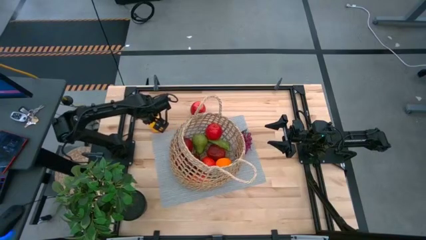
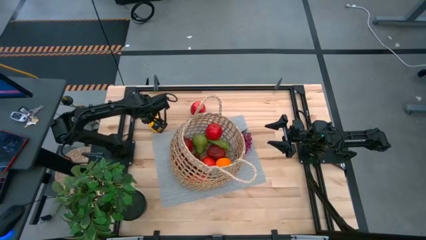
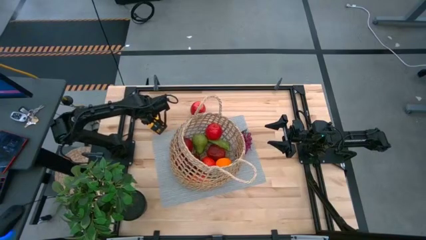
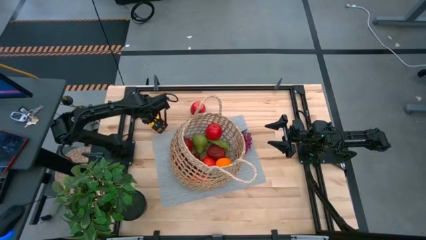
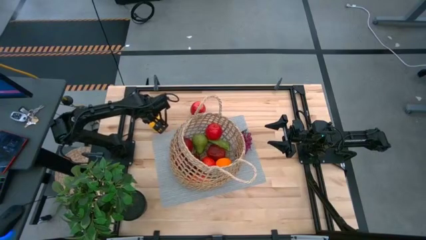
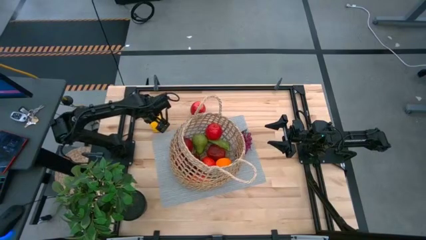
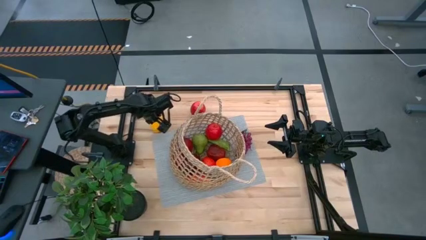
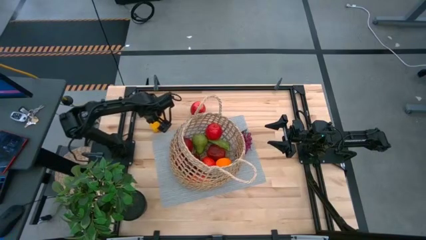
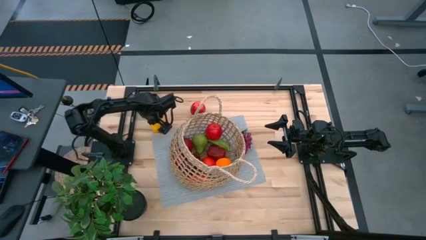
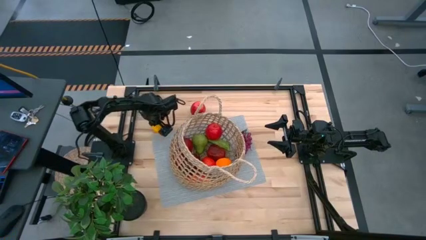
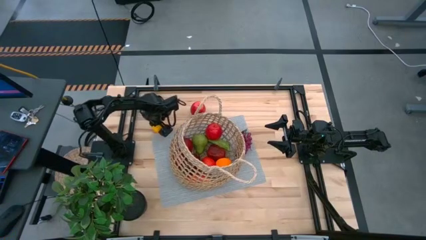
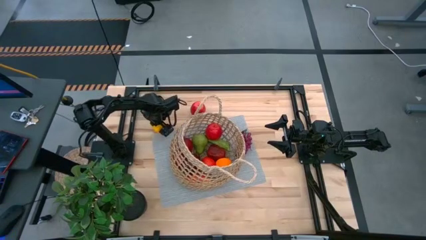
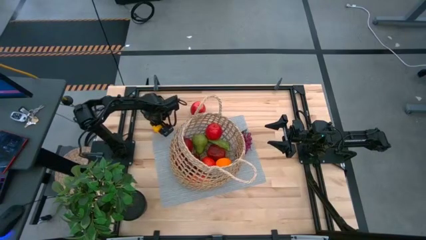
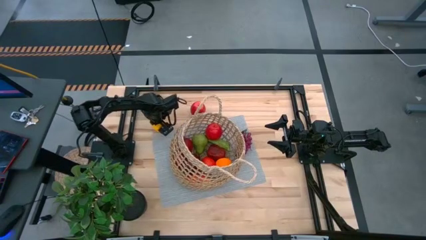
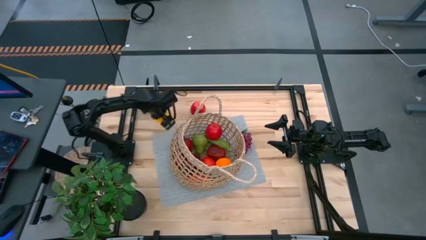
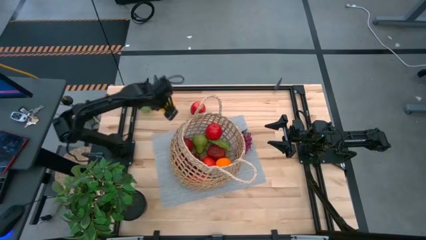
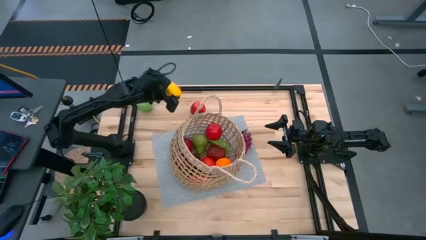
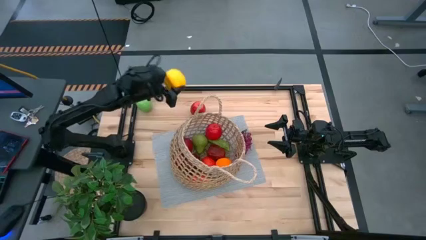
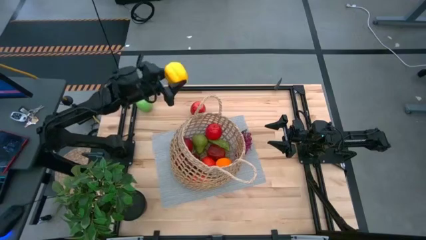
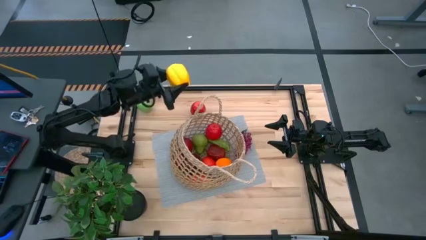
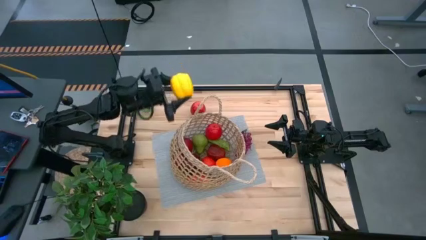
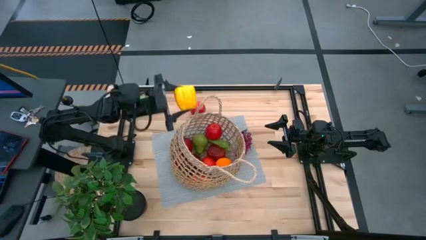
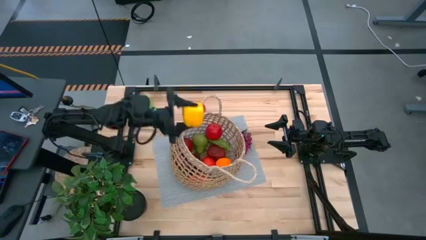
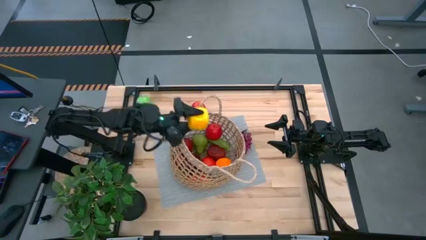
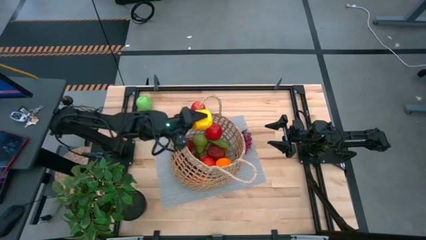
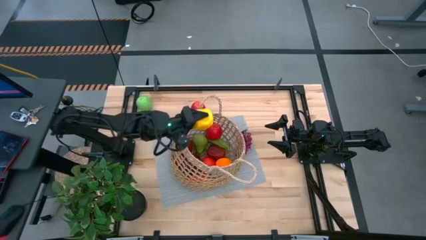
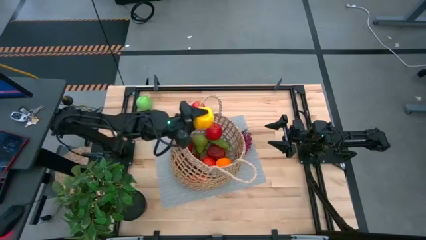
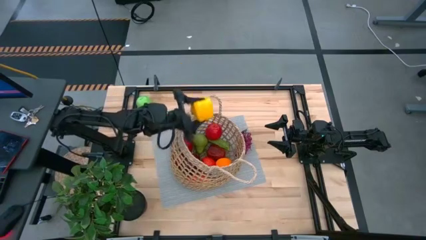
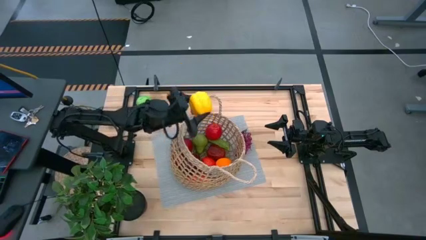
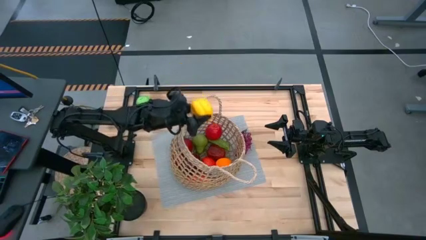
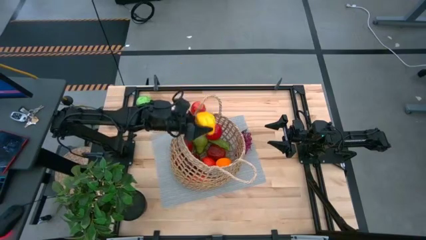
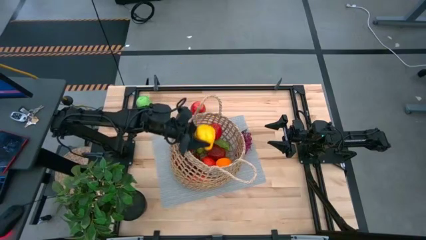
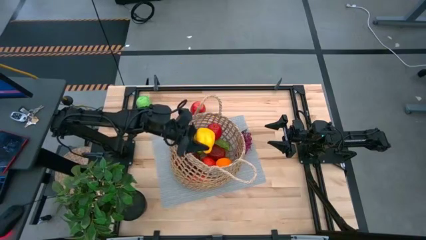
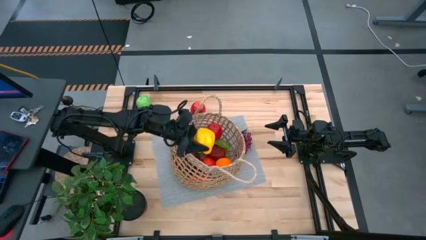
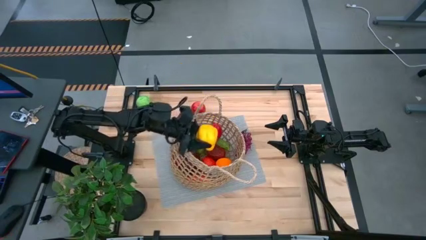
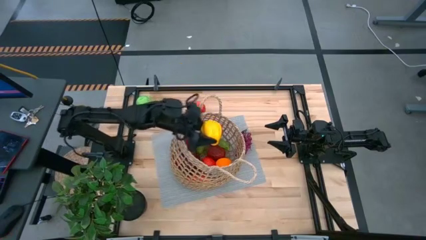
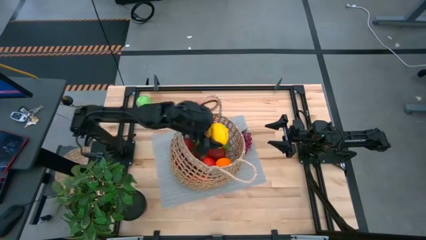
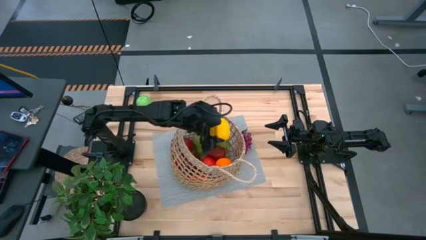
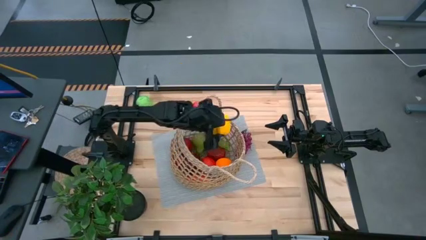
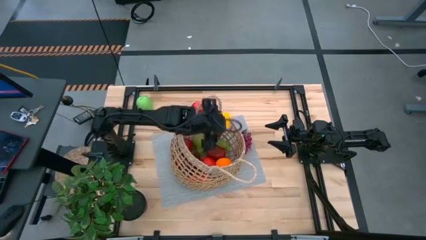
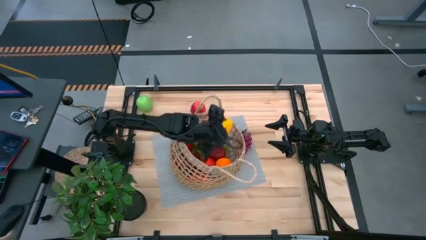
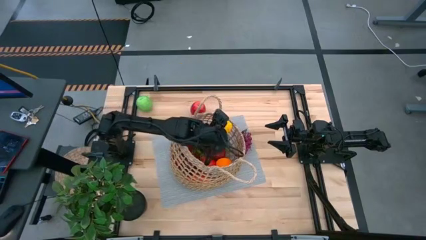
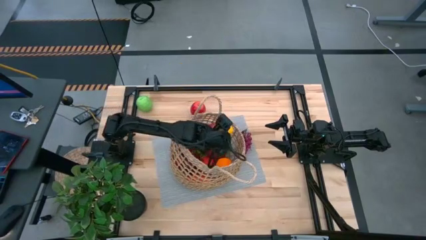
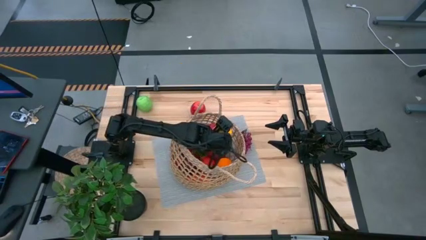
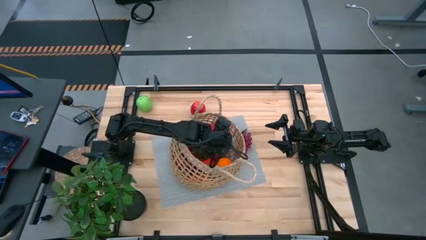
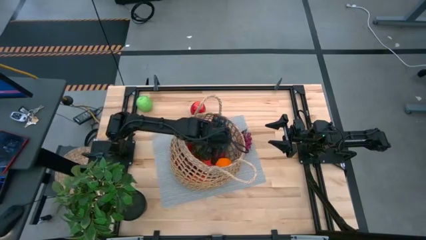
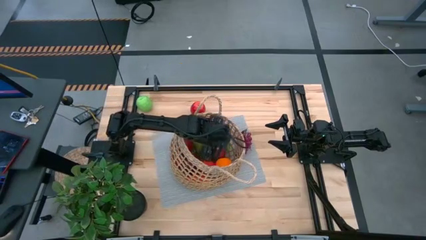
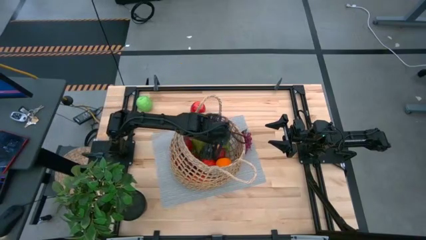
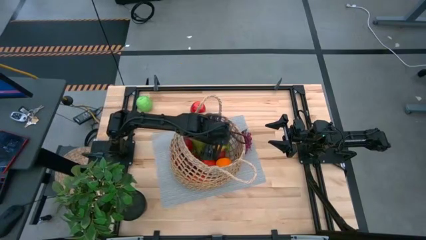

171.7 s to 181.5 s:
Task: Build produce basket
Put the yellow bell pepper into the basket

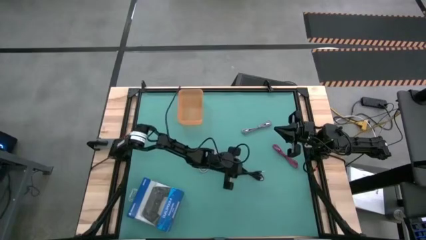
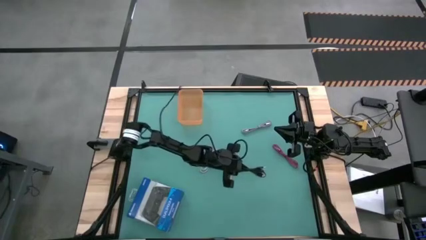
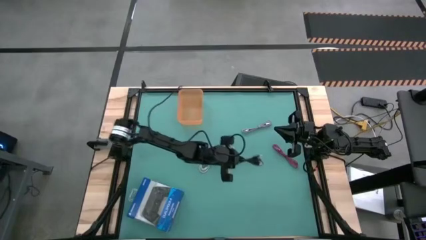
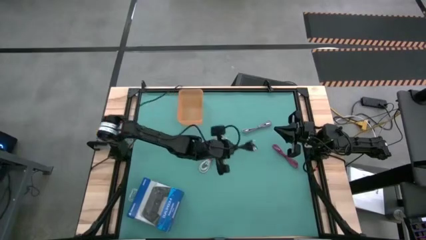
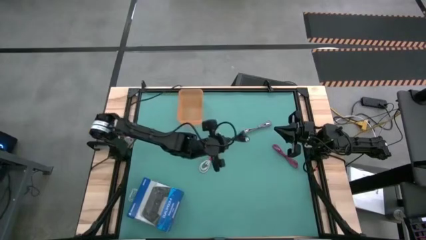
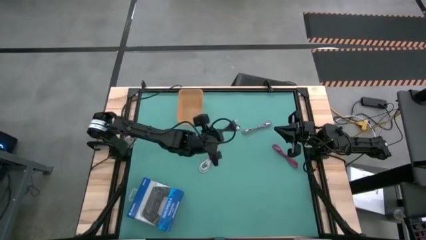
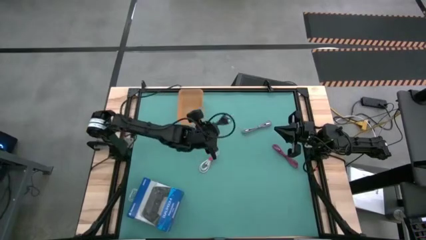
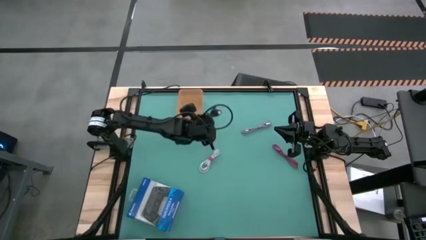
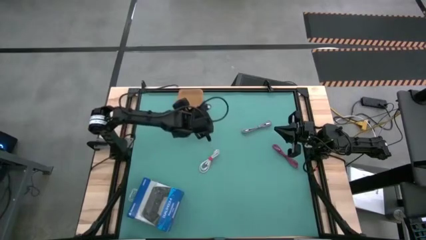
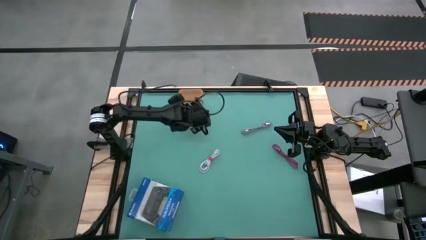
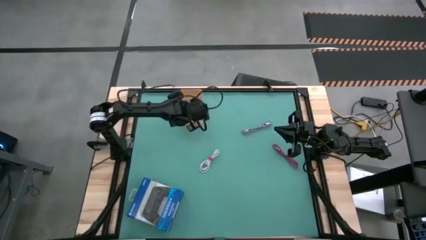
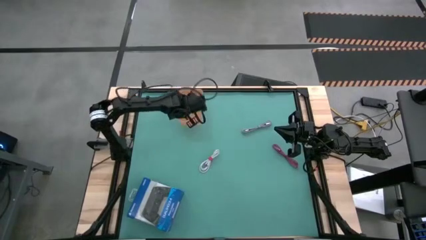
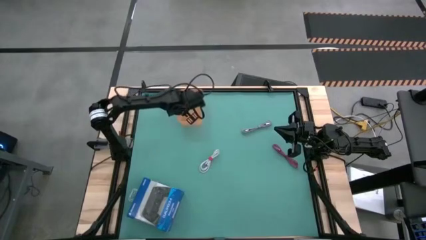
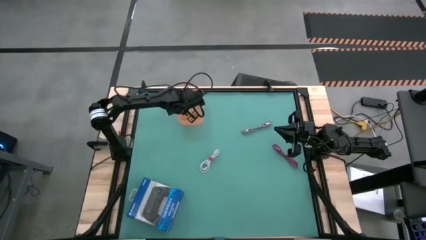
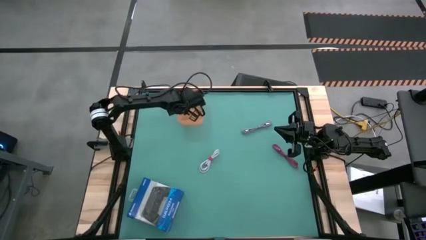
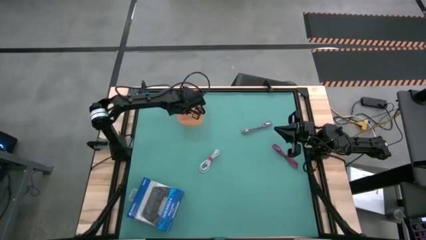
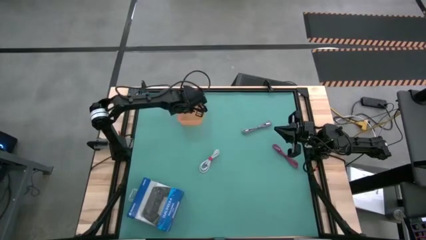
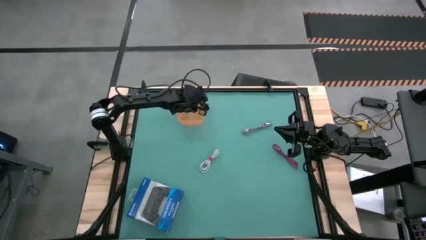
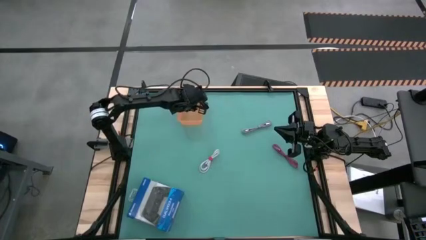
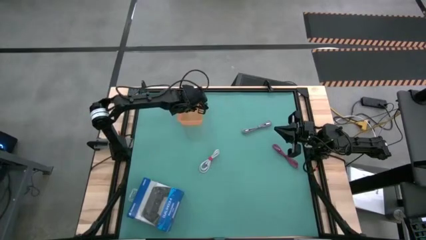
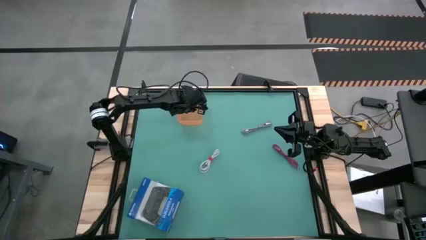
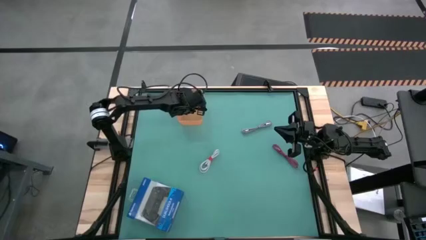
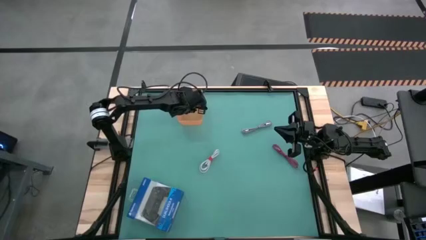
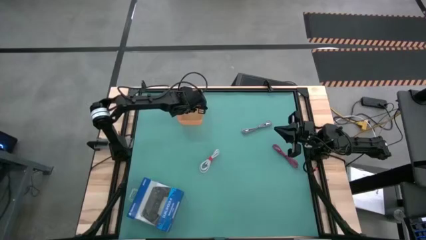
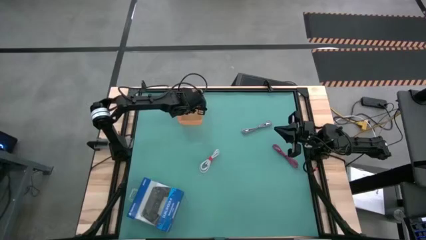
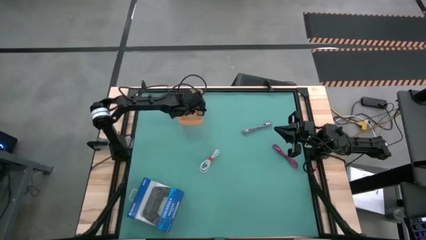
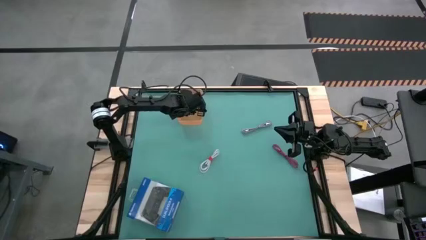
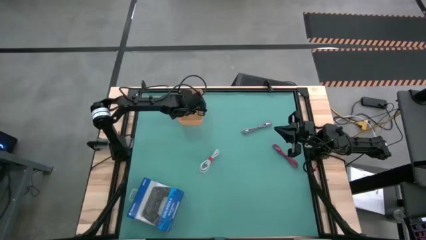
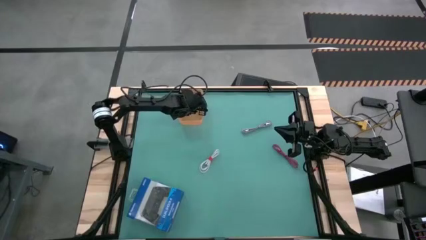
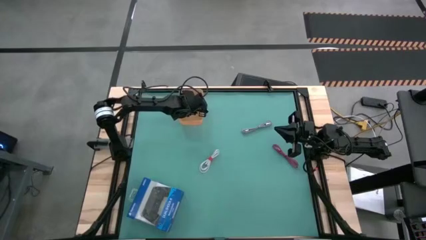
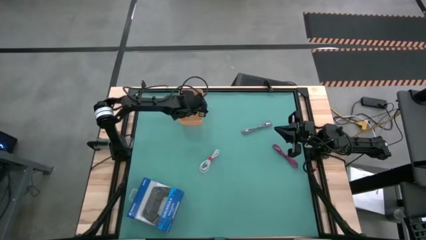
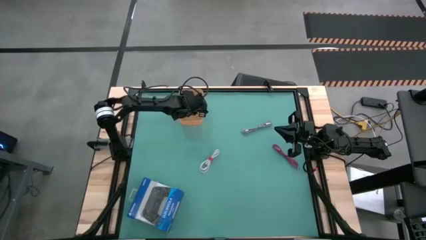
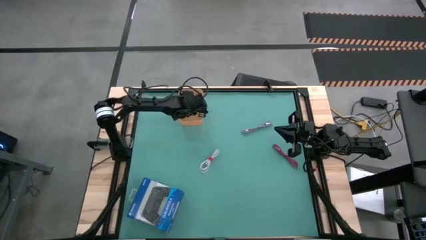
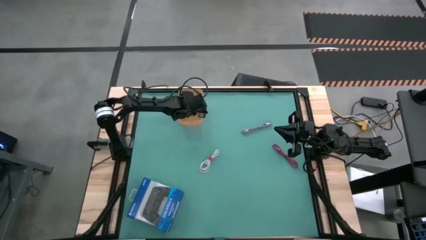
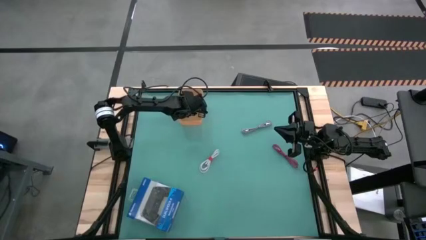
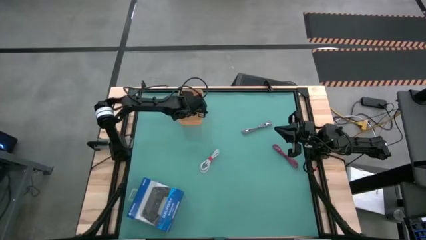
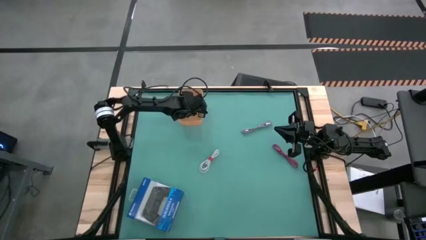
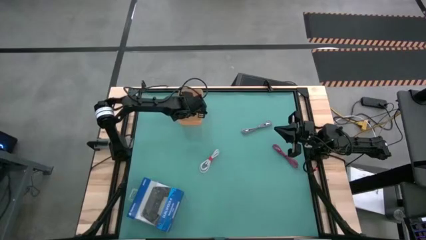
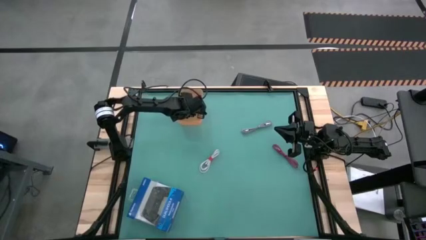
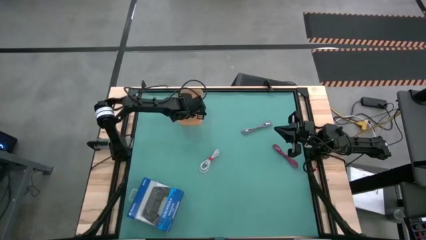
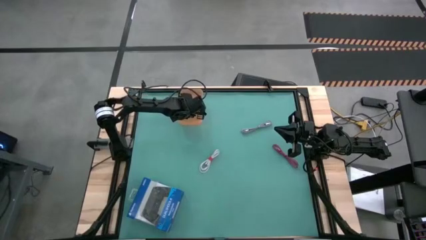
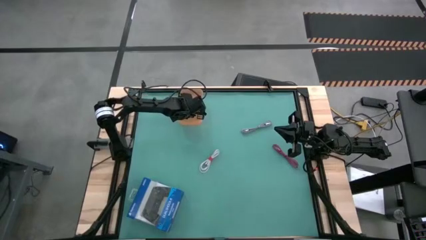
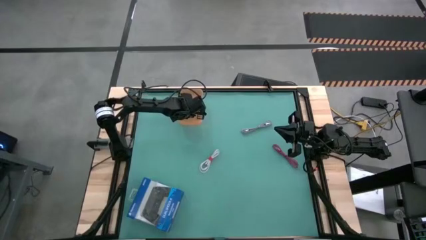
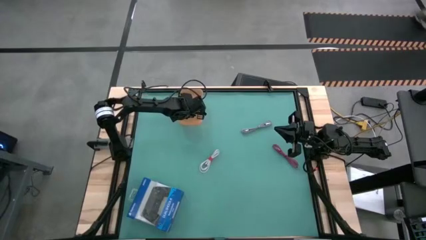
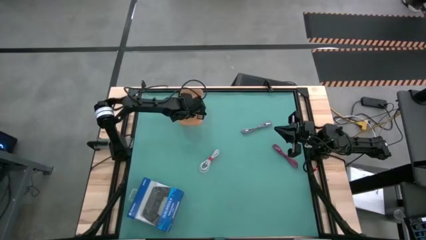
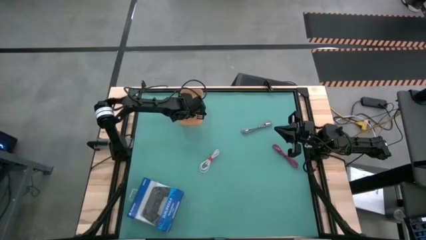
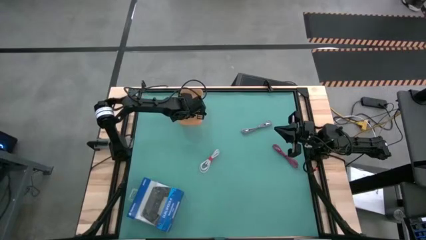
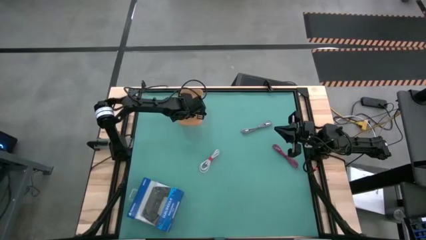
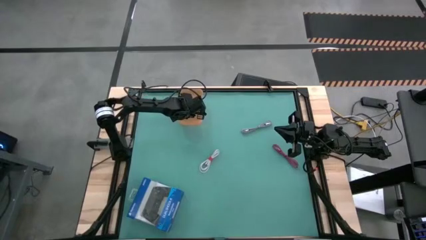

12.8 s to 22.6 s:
Task: Pick and place USB-C Cables
Put the black charger cable into the orange bin
